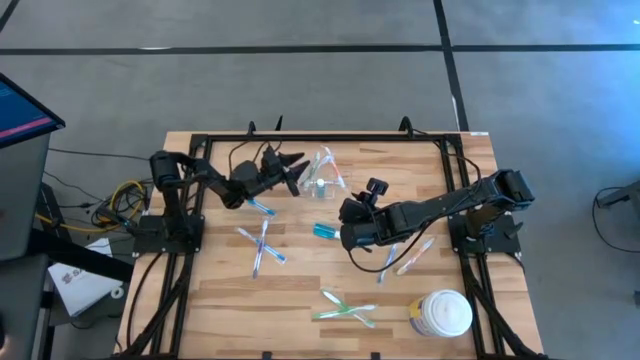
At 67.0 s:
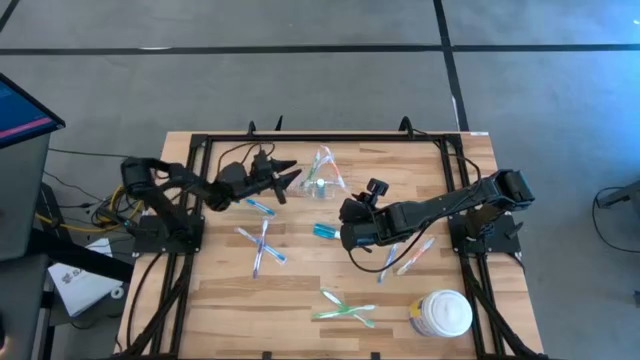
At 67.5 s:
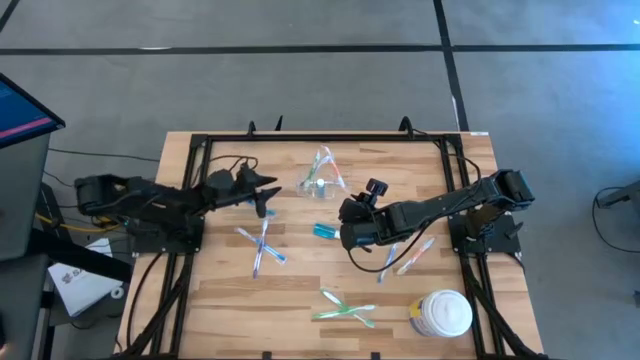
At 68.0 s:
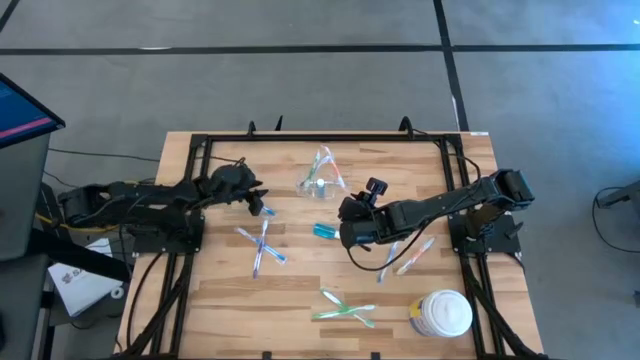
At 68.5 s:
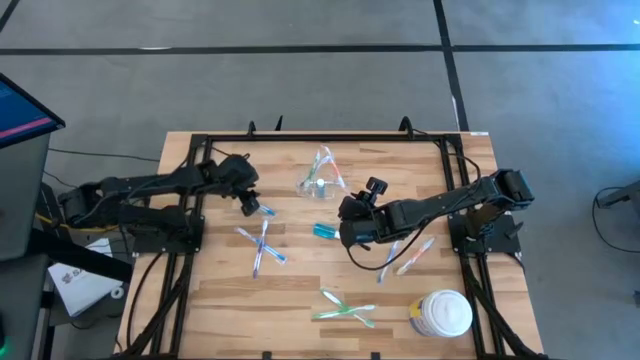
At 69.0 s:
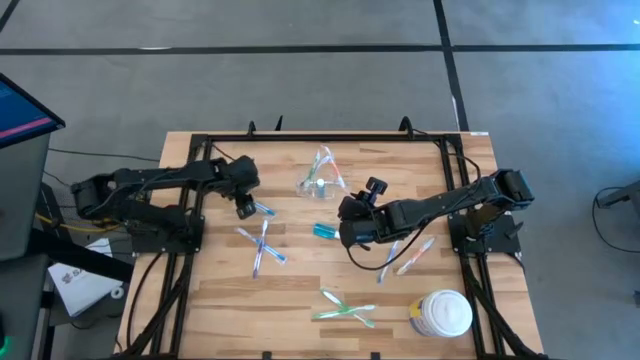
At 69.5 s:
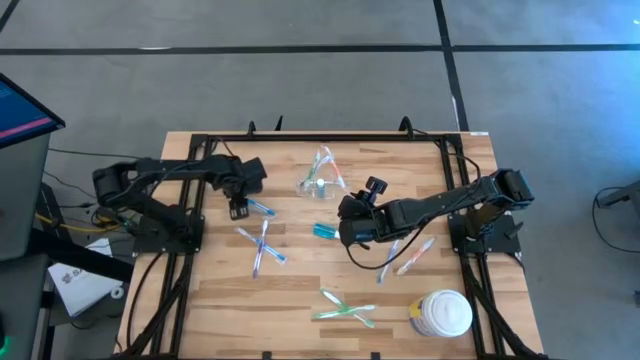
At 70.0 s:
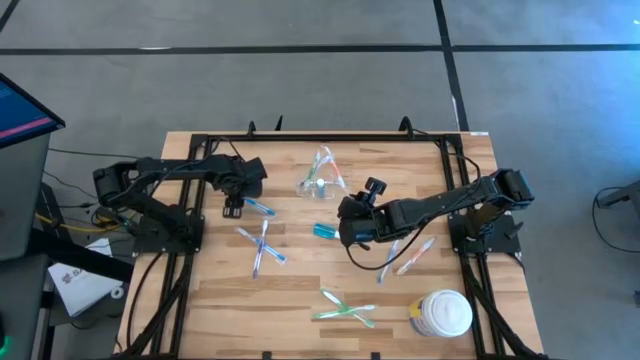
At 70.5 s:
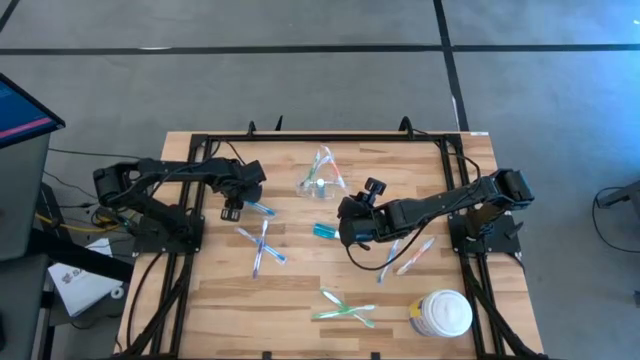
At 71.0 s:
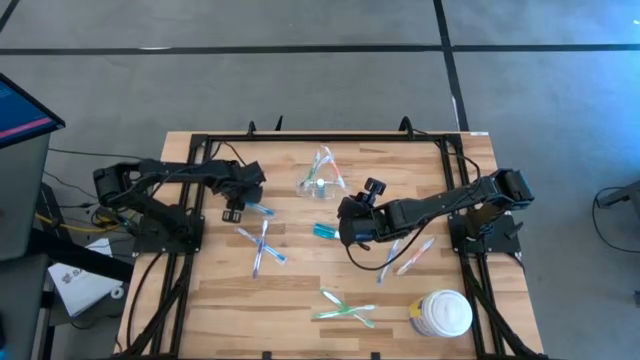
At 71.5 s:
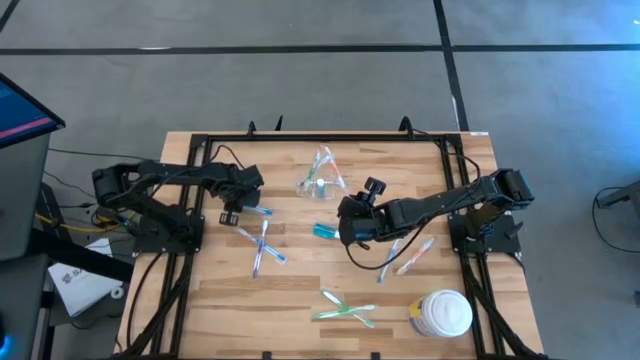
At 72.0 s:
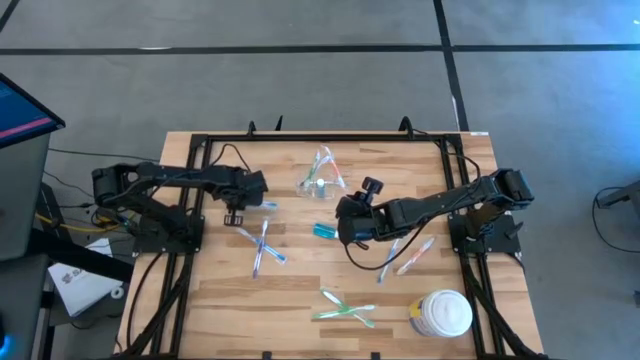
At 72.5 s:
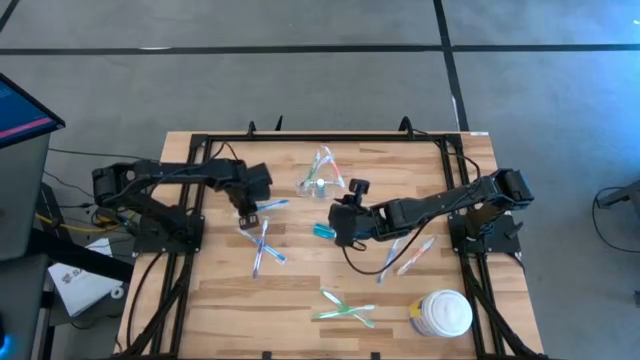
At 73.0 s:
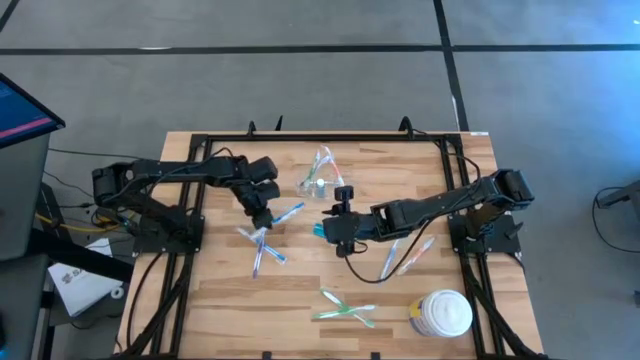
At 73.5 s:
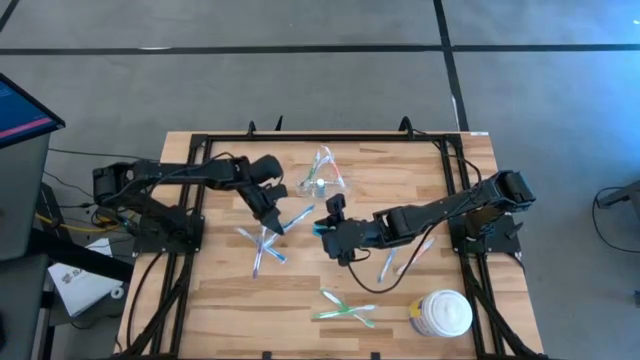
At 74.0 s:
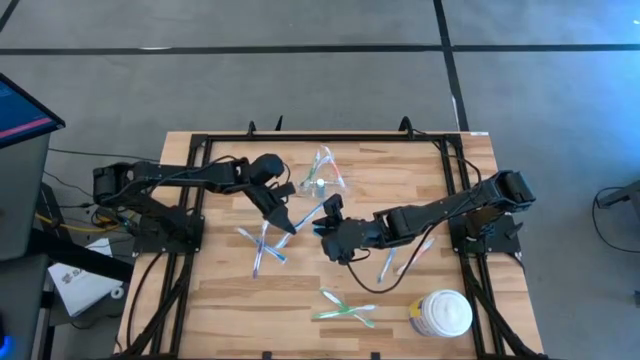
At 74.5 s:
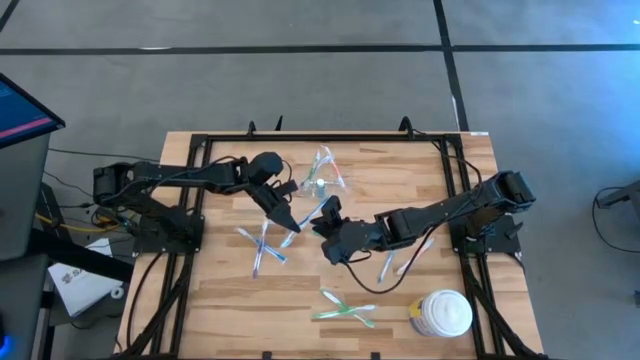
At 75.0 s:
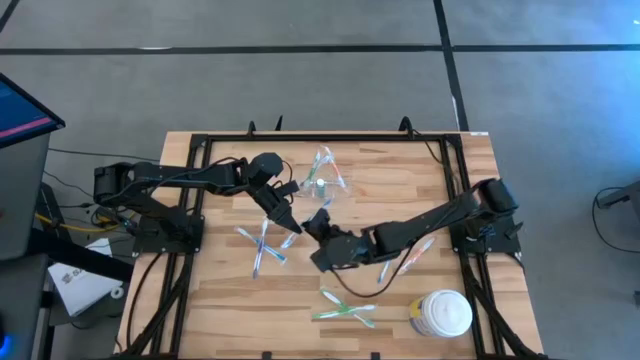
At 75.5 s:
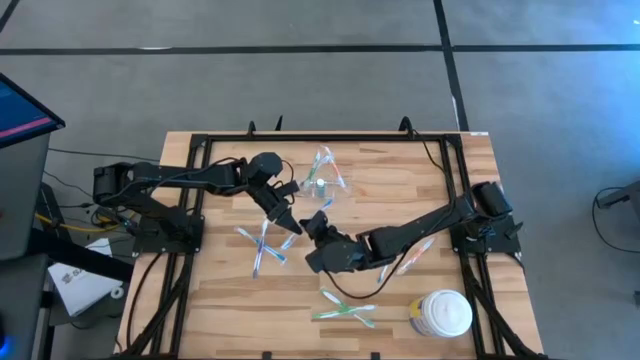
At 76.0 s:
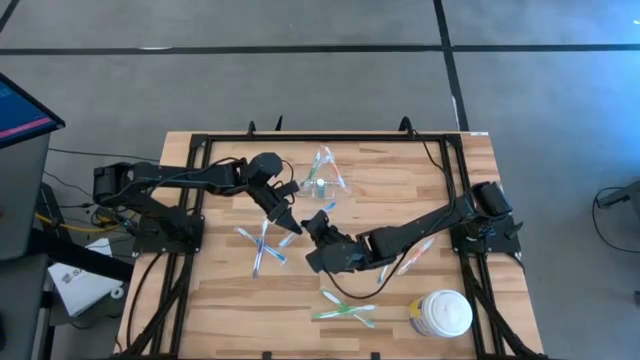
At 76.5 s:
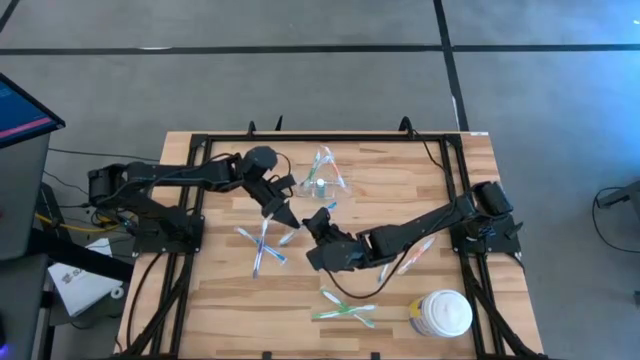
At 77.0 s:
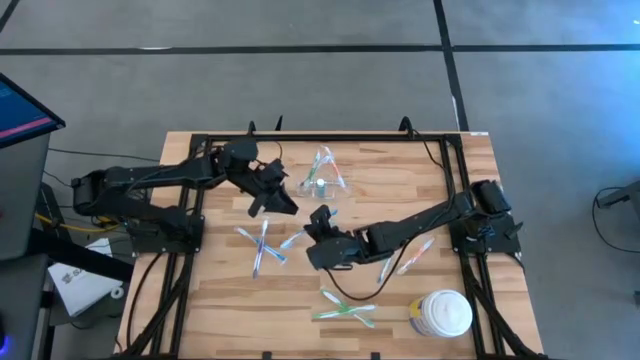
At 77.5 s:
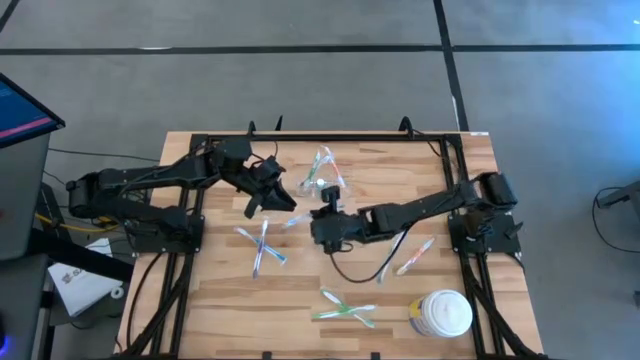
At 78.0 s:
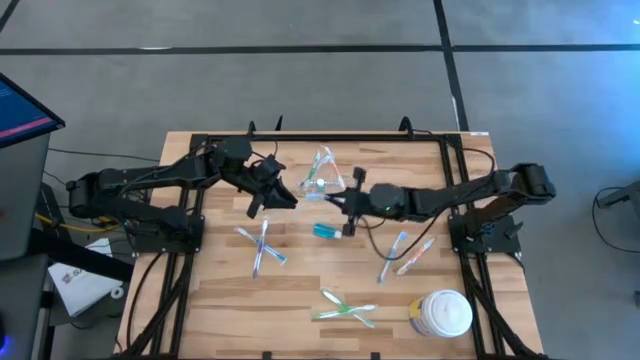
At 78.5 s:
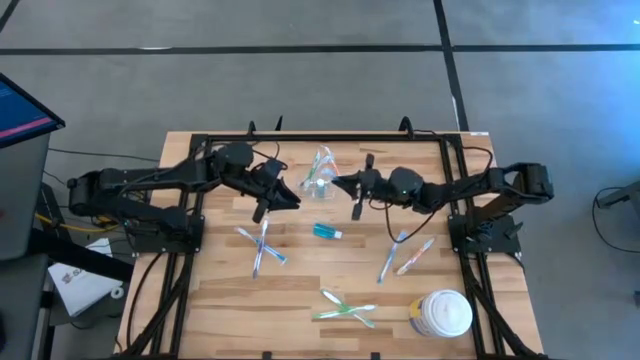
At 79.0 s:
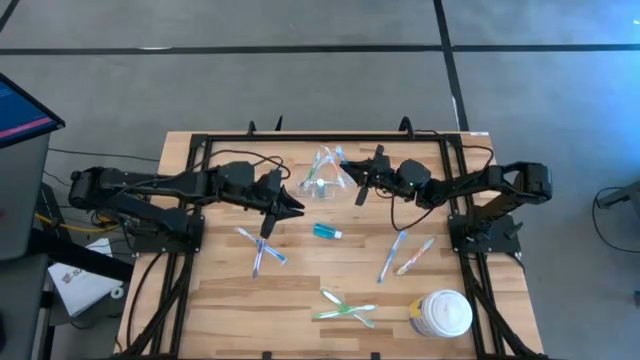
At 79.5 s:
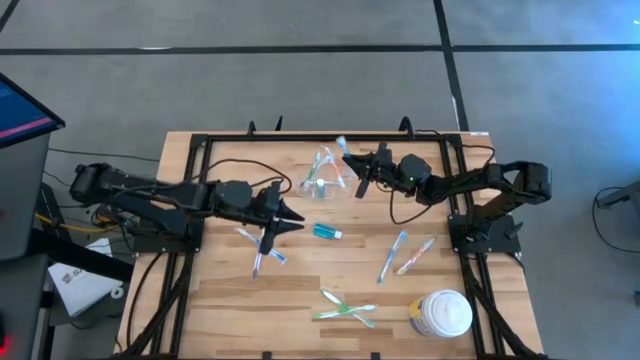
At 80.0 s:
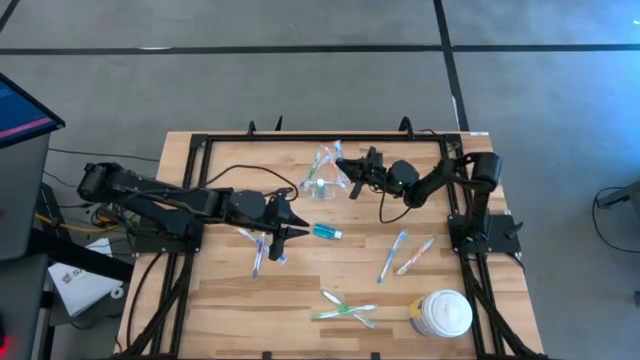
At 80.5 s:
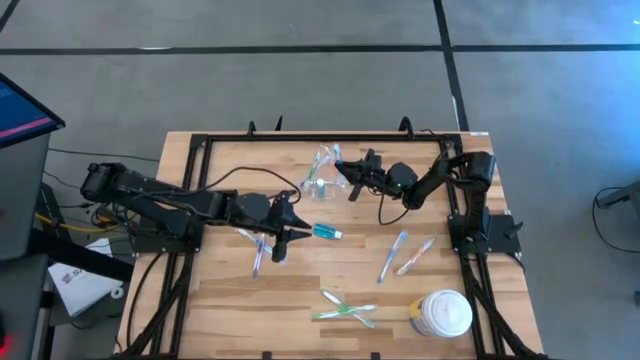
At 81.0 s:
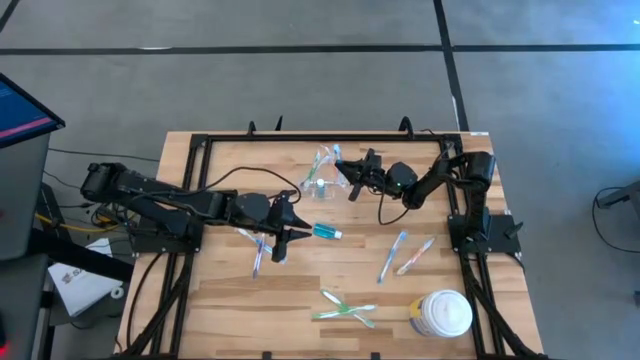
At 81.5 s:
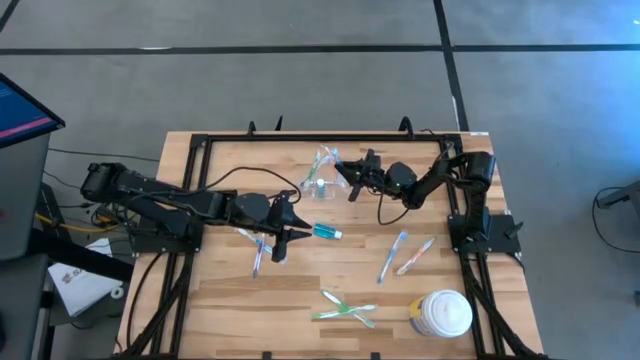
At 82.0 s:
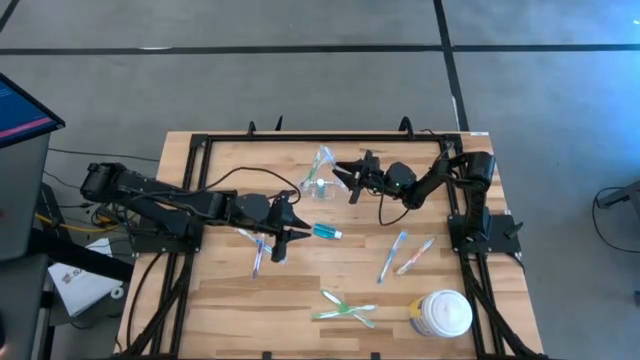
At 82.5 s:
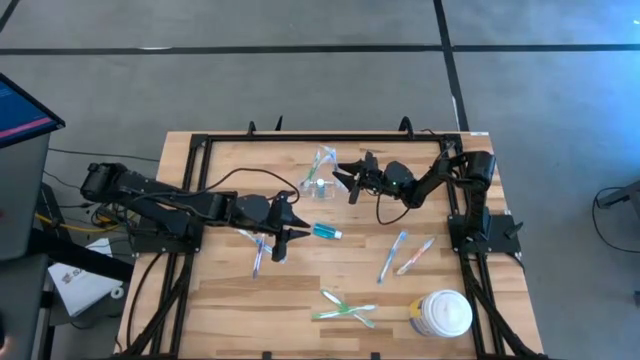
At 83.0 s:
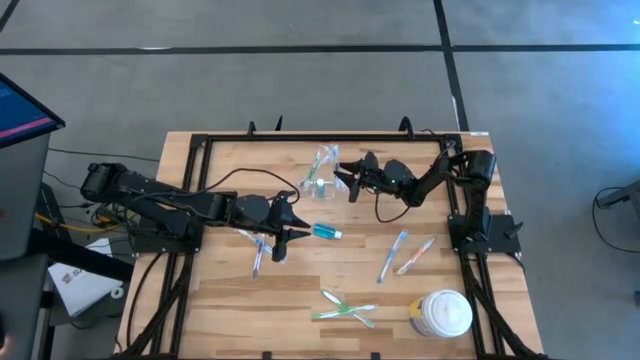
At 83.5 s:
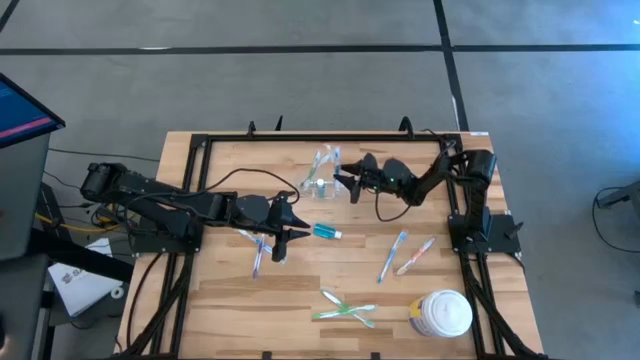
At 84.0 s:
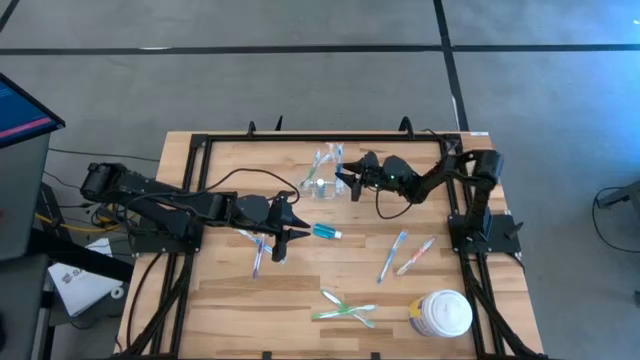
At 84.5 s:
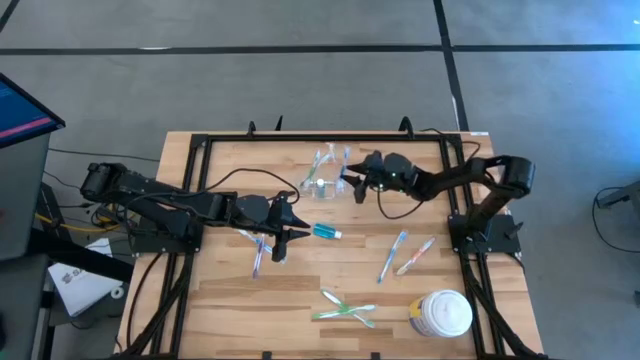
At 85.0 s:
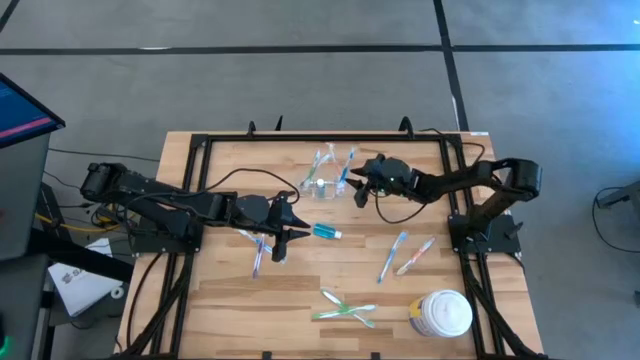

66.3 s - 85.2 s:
Task: Pick & Place toothbrushing station
Put the top blue toothbrush into the transparent organizer
